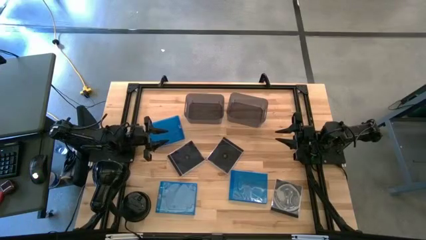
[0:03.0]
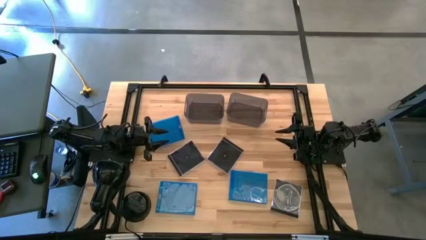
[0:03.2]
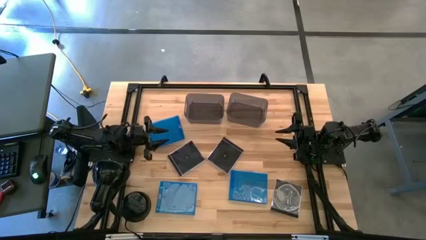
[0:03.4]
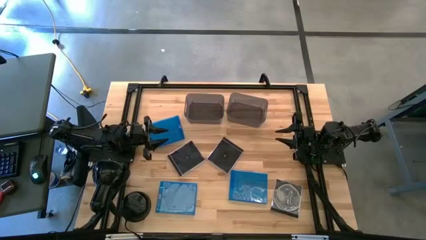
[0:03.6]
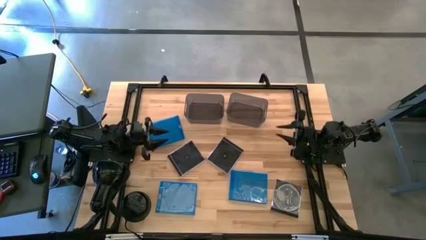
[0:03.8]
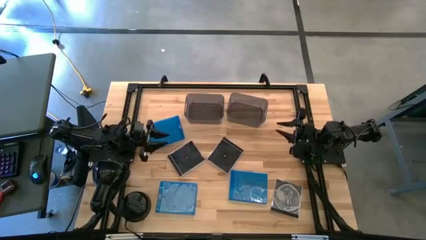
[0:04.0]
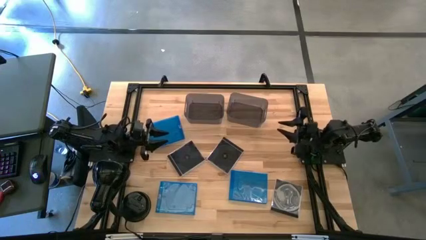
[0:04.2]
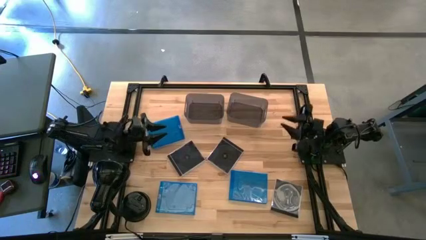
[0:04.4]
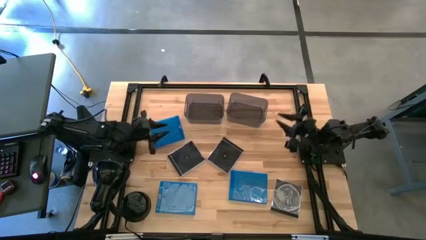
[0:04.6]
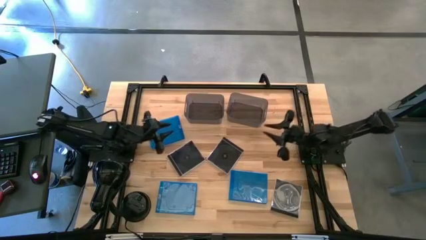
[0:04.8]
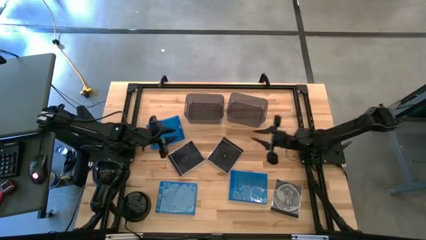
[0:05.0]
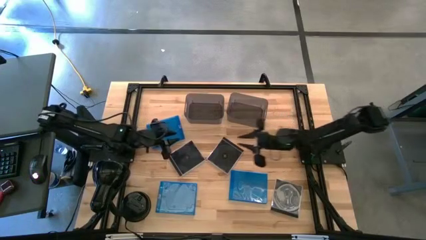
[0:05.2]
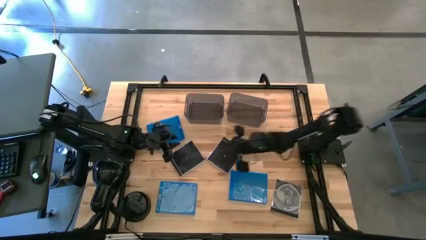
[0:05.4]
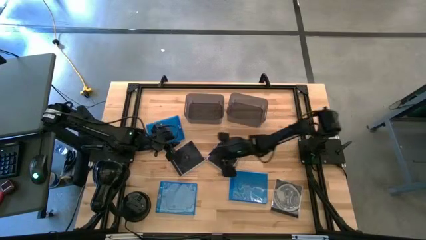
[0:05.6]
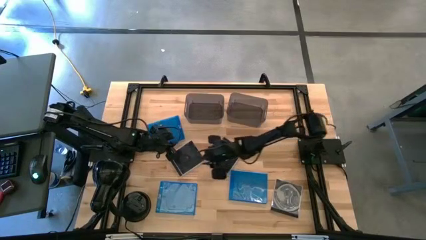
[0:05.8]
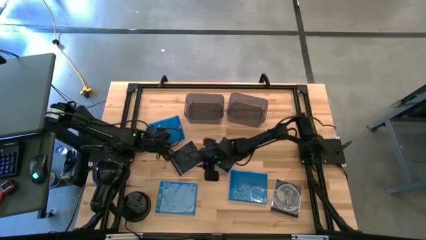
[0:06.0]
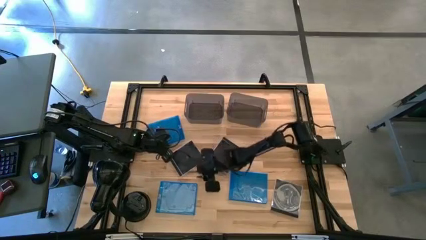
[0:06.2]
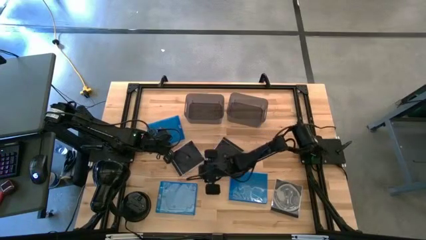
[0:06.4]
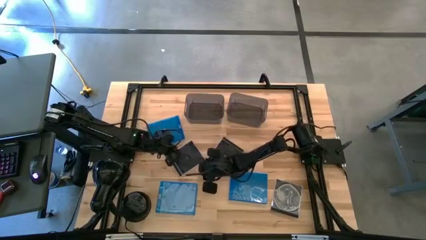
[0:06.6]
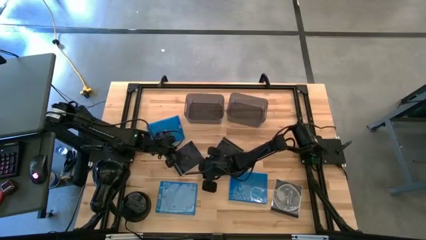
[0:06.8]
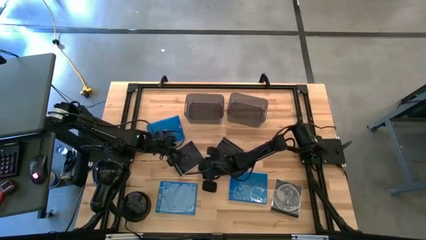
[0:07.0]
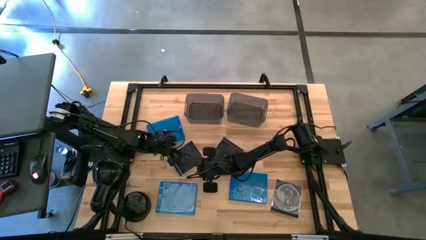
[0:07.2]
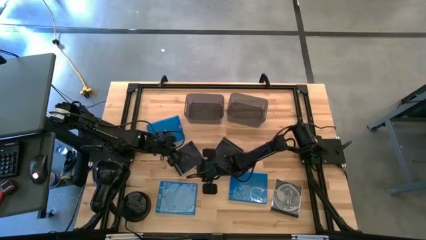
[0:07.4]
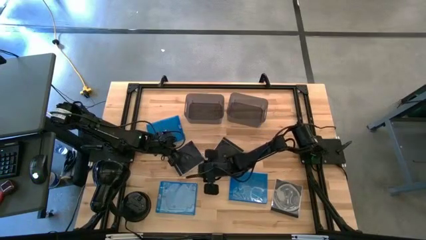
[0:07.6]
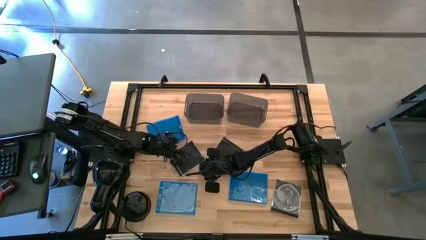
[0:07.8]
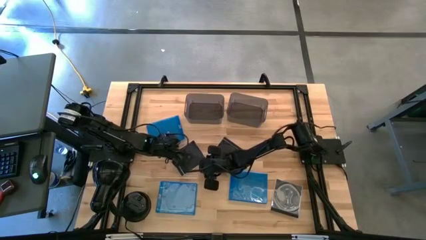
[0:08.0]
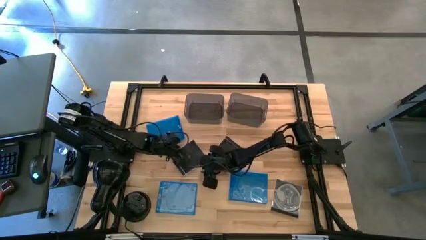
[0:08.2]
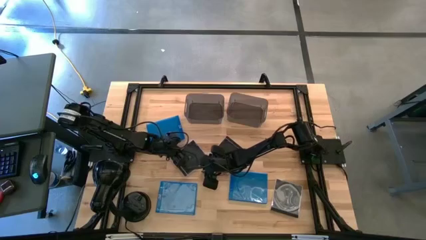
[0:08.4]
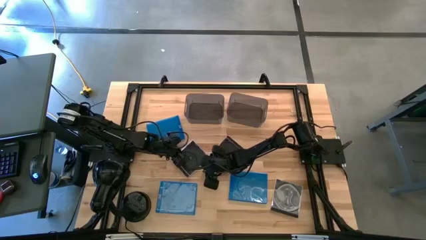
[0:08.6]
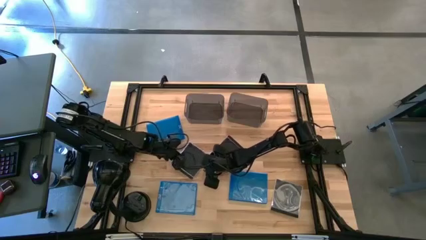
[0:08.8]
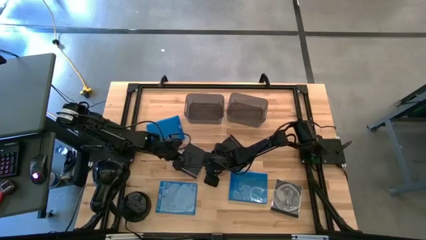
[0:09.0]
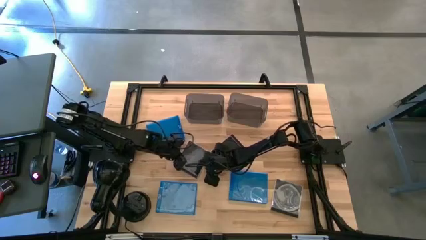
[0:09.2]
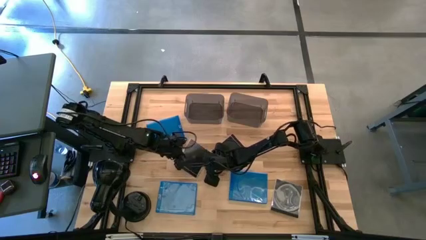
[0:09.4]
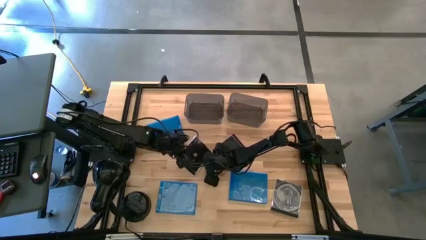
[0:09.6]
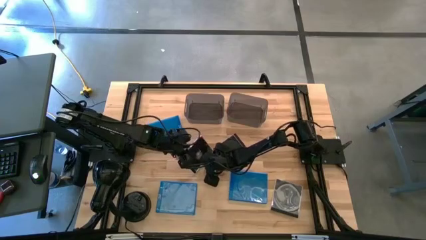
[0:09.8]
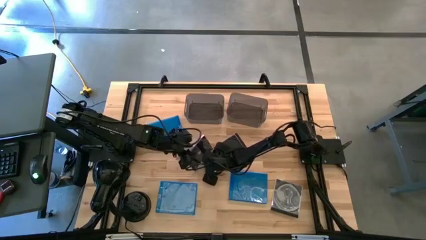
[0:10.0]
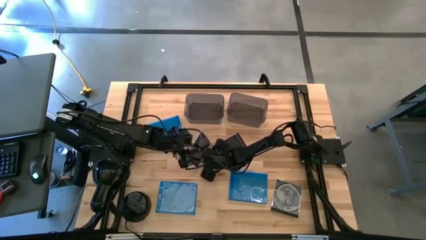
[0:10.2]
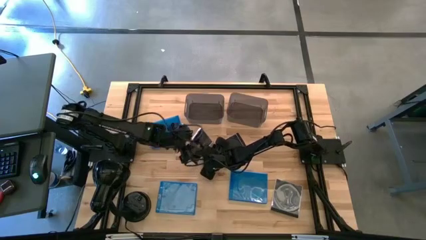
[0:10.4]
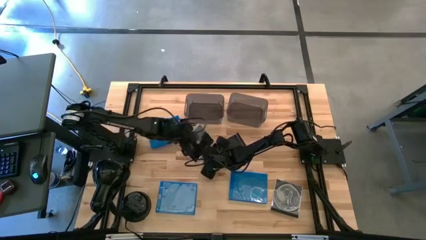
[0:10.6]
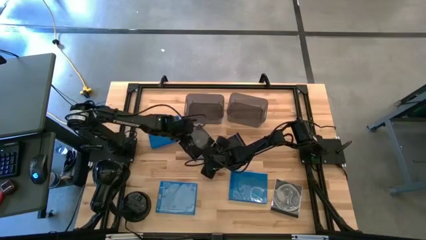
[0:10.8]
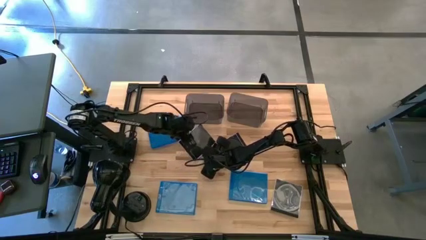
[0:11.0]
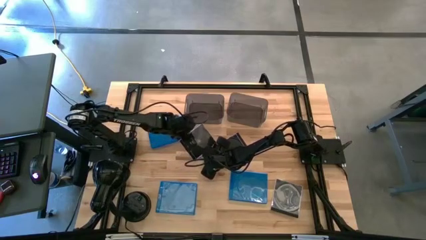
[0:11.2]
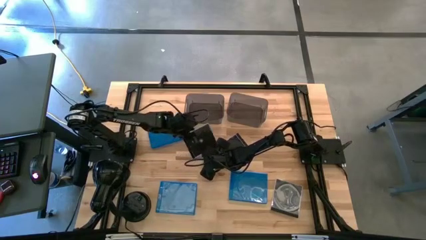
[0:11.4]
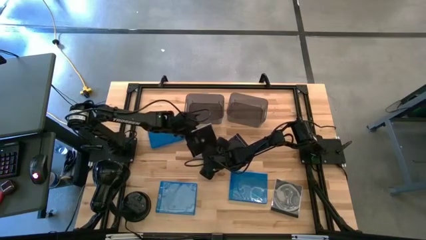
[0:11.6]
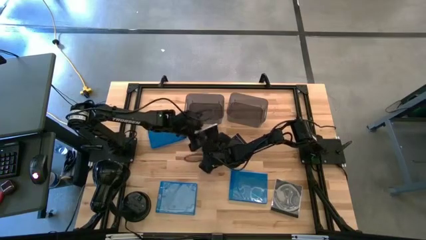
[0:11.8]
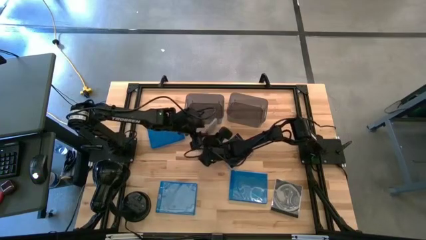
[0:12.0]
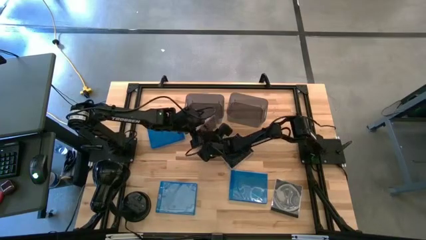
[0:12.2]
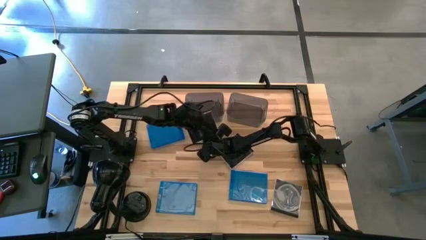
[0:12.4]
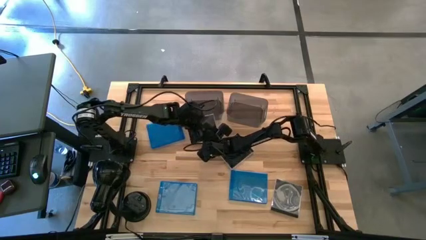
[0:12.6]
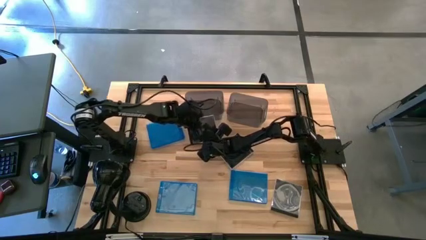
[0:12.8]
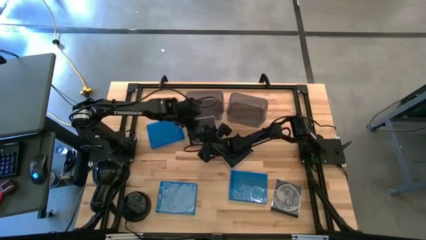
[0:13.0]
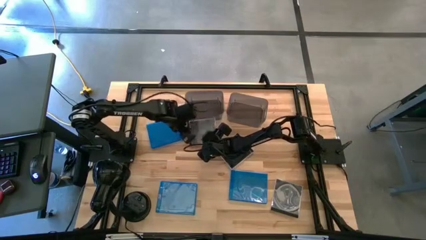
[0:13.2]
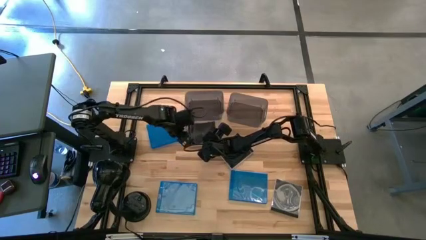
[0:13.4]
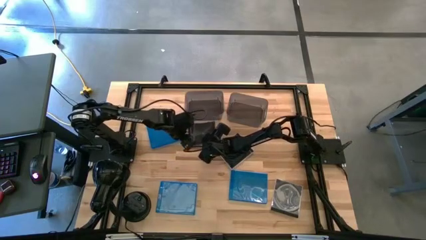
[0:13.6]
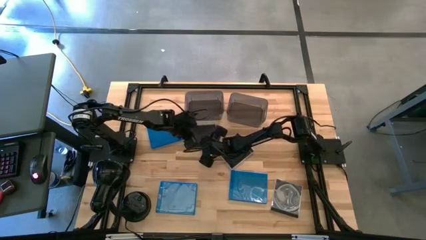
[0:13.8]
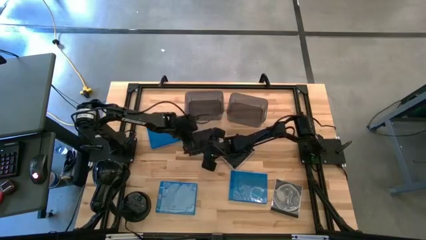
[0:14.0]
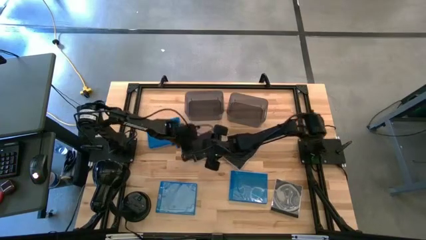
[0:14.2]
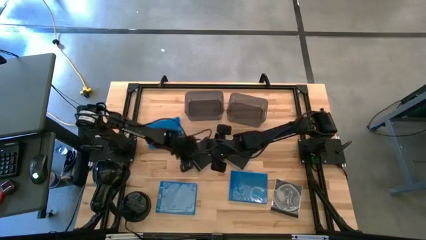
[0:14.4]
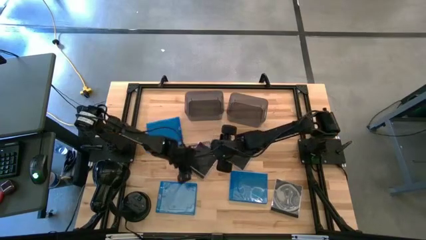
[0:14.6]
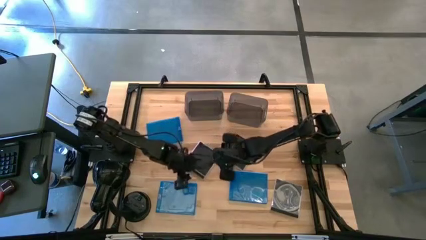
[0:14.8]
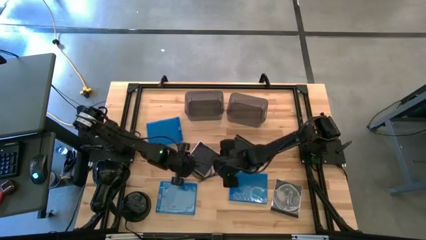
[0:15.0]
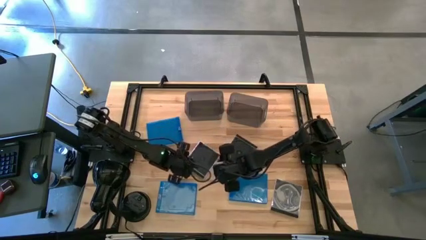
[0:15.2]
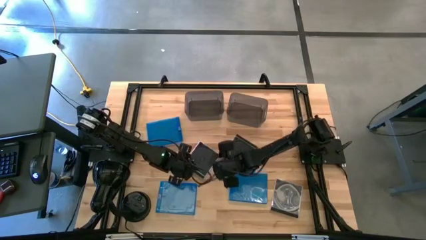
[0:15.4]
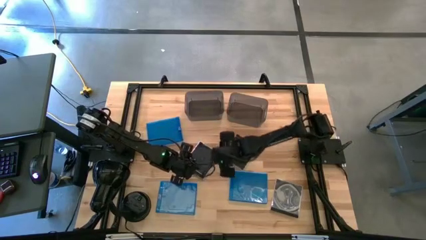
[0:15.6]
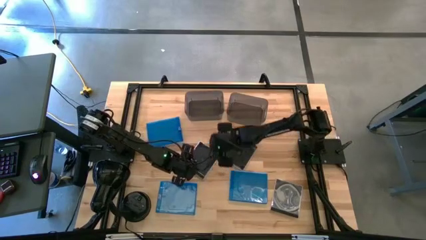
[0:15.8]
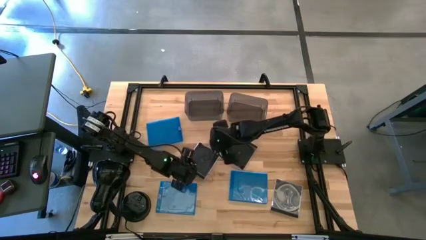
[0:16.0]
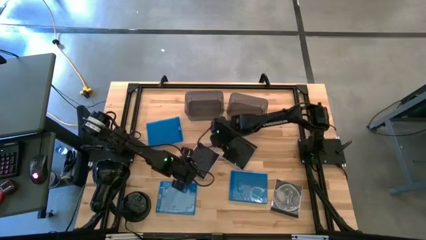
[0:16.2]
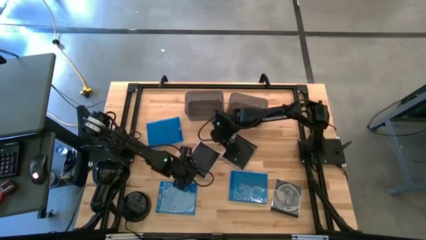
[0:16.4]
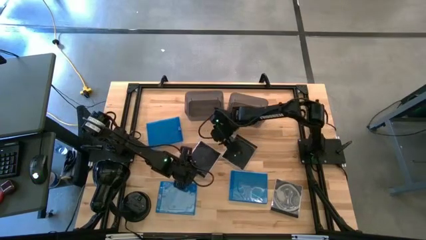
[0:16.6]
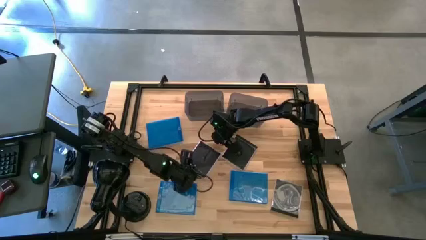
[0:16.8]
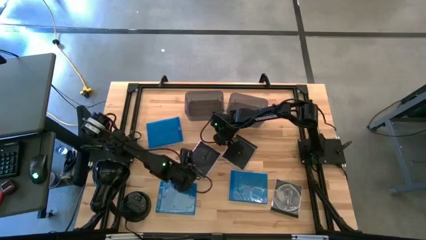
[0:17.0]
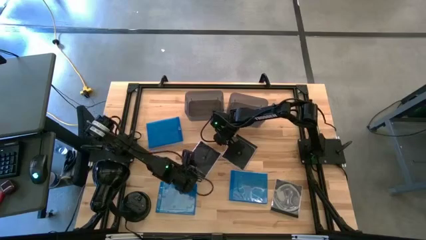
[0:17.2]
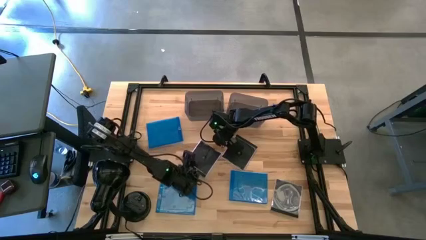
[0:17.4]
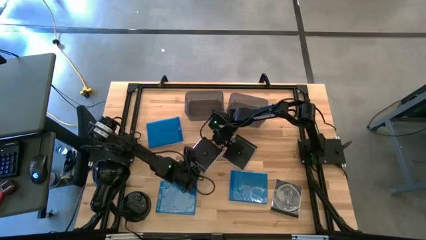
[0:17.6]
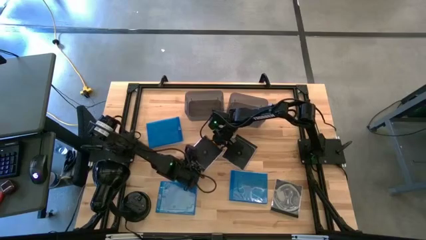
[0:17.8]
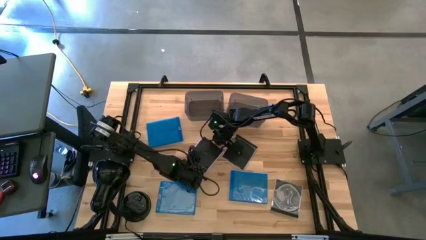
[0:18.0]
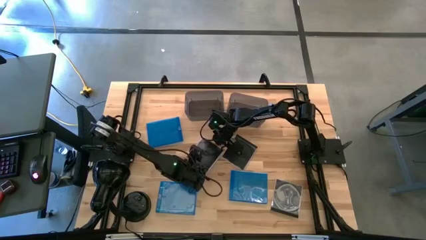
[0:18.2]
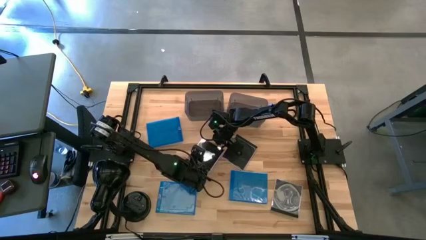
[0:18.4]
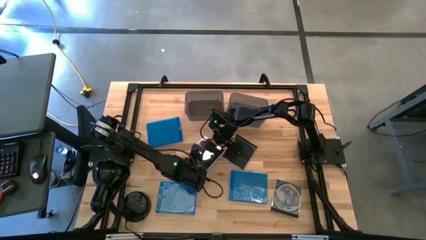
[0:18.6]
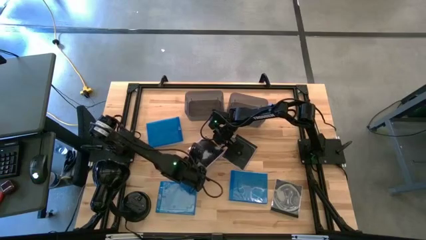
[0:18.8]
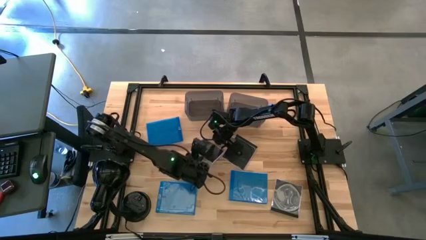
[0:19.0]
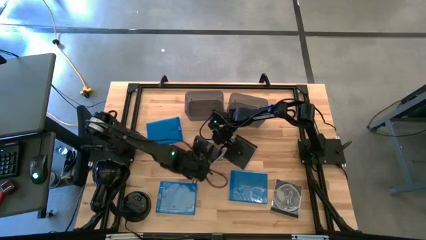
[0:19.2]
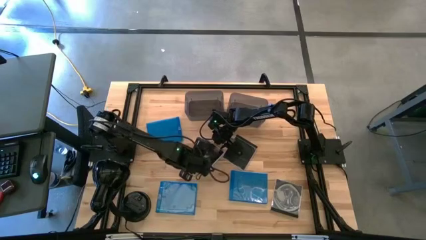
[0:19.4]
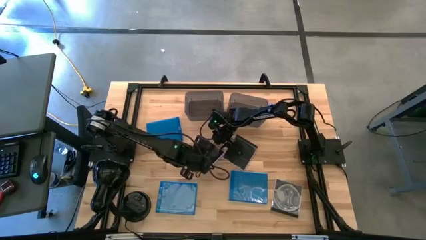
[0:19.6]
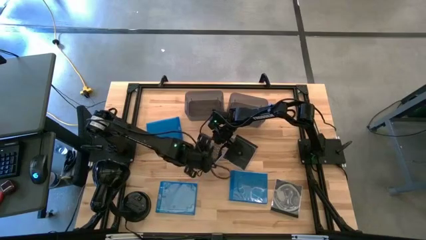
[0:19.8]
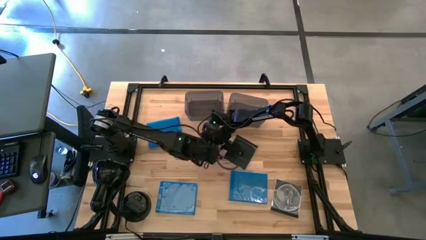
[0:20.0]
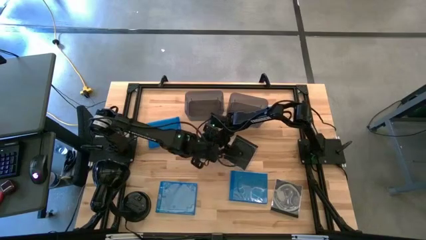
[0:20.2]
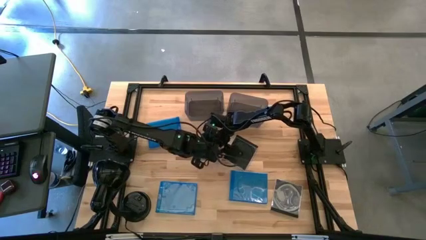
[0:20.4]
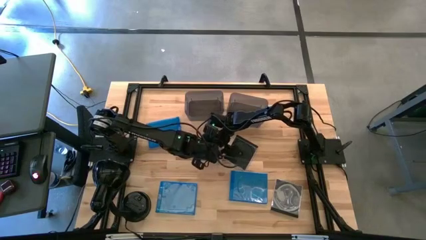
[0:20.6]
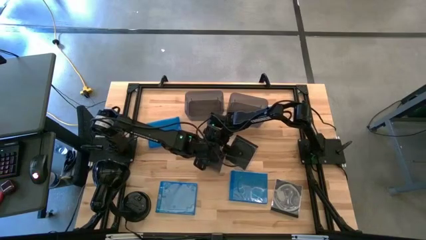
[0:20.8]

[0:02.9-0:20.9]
Task: Pick & place jewel cases by type
Put the top left black CD case into the left black bin
